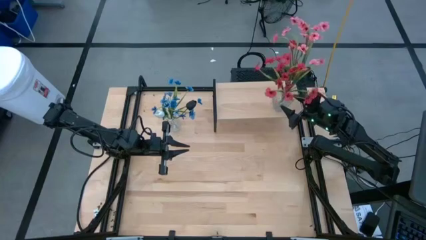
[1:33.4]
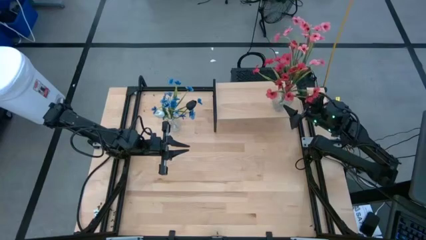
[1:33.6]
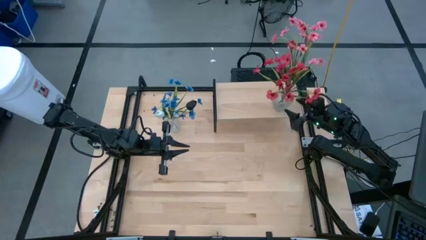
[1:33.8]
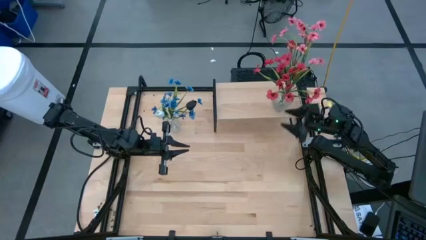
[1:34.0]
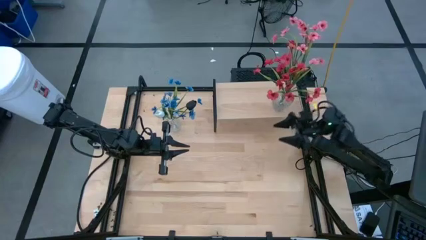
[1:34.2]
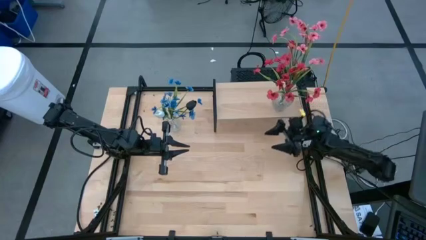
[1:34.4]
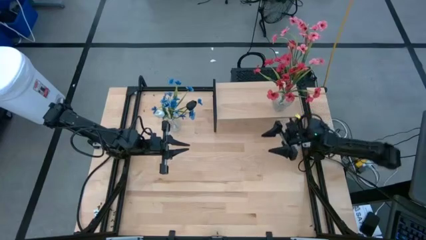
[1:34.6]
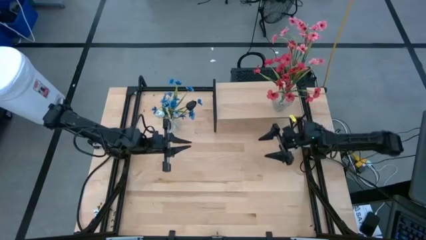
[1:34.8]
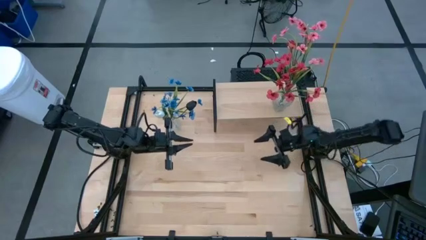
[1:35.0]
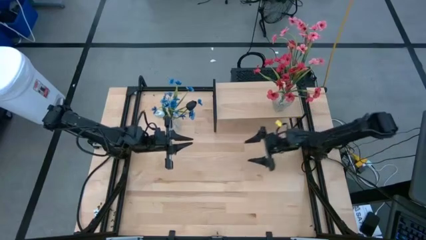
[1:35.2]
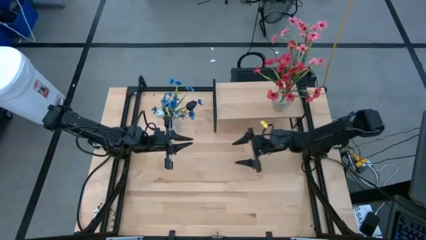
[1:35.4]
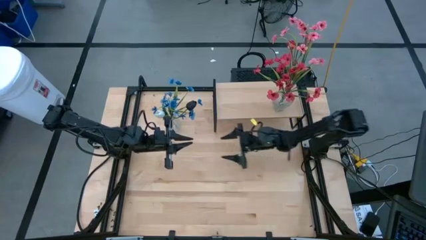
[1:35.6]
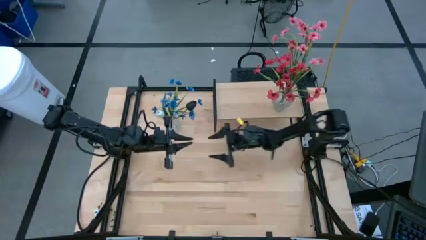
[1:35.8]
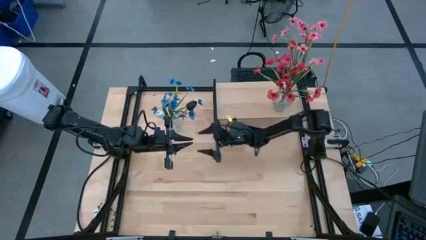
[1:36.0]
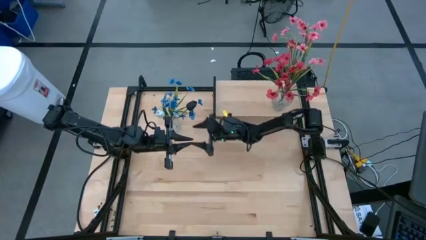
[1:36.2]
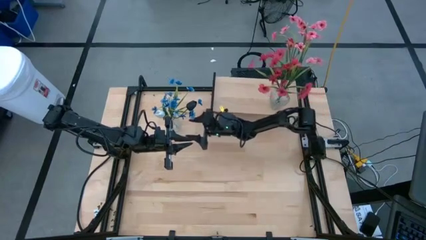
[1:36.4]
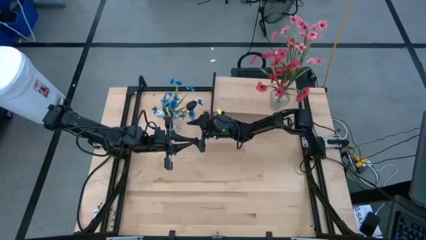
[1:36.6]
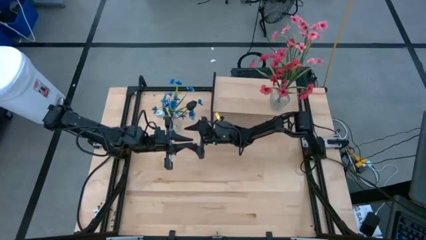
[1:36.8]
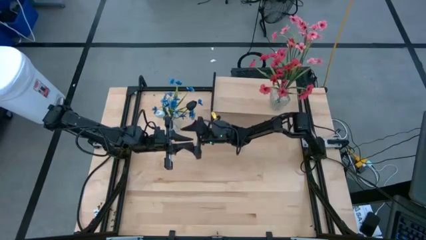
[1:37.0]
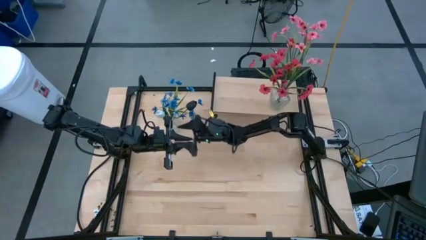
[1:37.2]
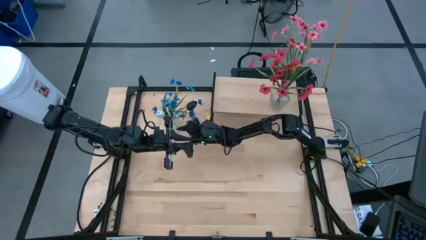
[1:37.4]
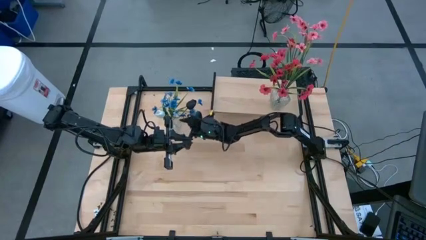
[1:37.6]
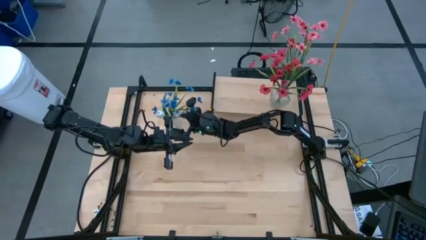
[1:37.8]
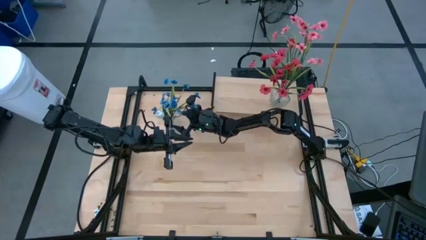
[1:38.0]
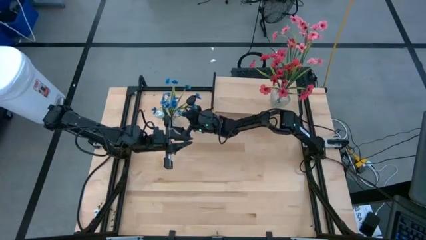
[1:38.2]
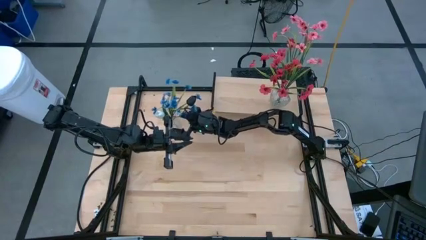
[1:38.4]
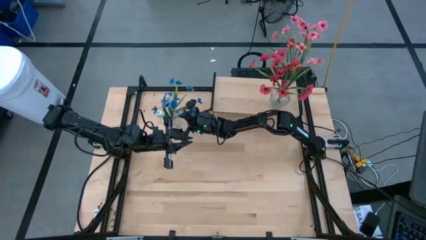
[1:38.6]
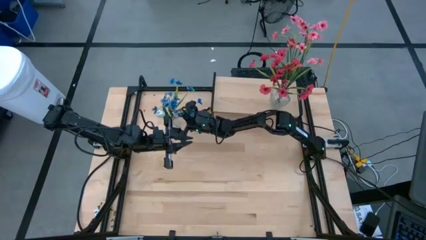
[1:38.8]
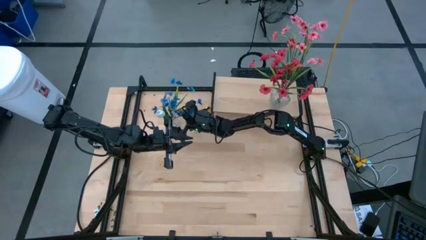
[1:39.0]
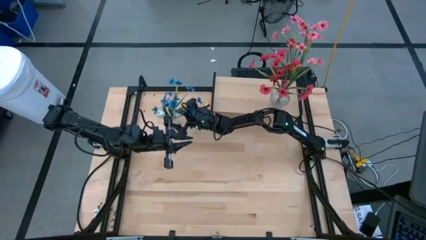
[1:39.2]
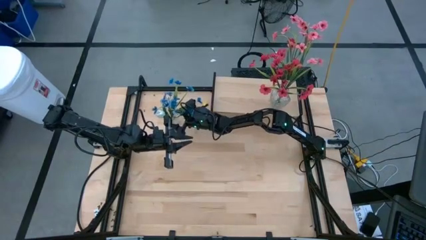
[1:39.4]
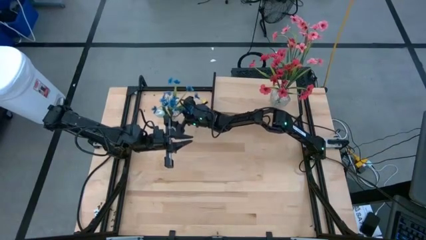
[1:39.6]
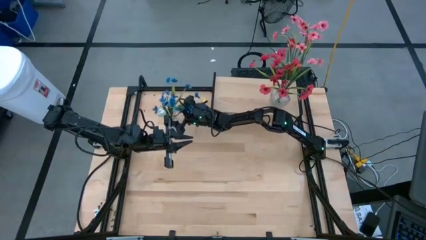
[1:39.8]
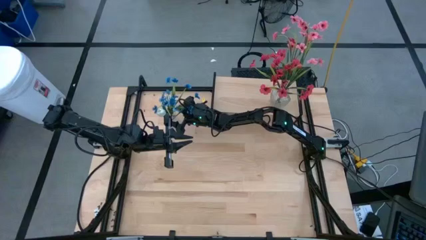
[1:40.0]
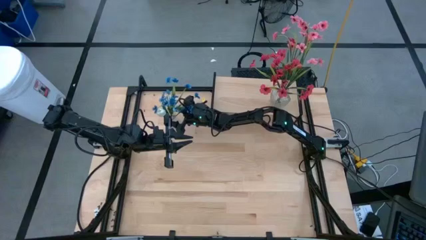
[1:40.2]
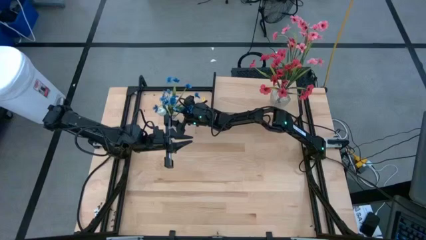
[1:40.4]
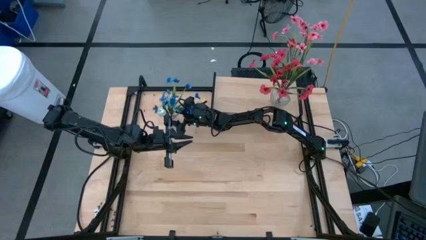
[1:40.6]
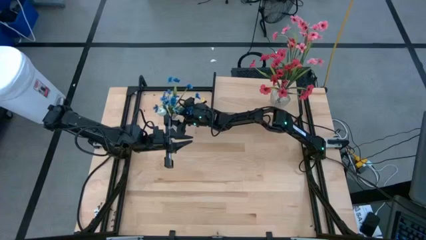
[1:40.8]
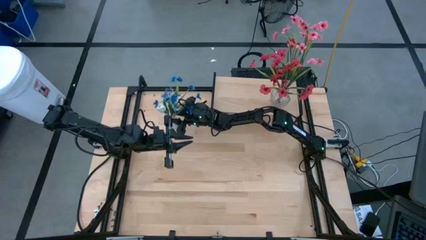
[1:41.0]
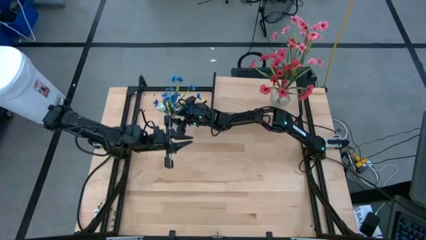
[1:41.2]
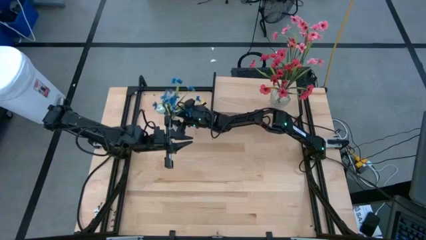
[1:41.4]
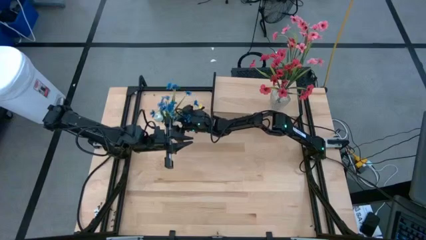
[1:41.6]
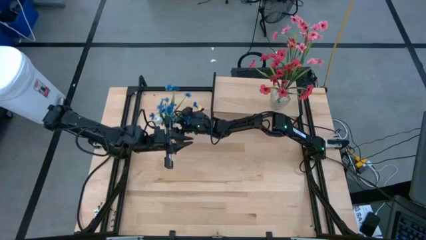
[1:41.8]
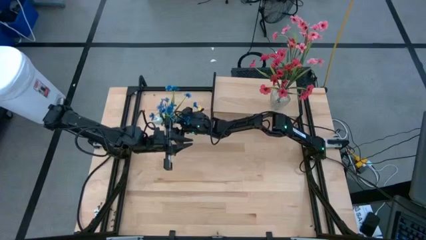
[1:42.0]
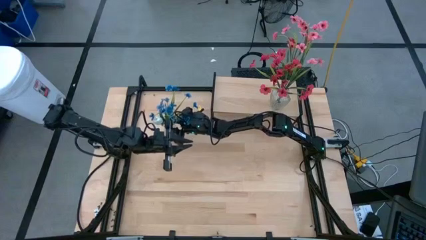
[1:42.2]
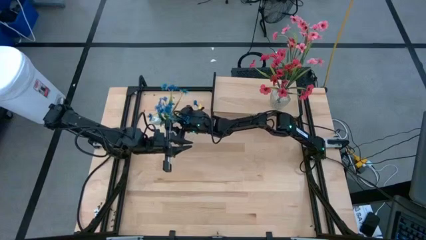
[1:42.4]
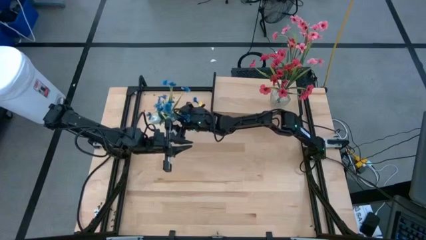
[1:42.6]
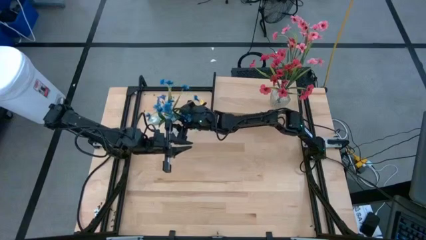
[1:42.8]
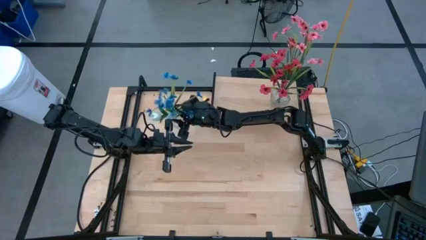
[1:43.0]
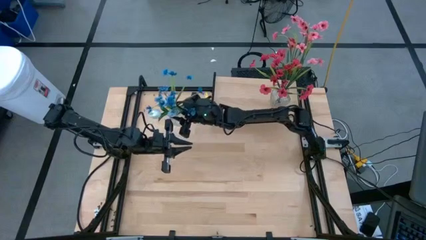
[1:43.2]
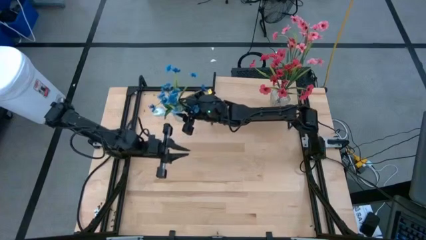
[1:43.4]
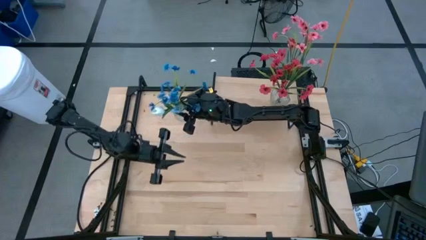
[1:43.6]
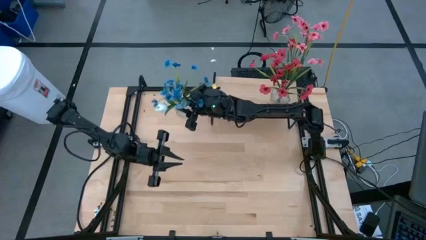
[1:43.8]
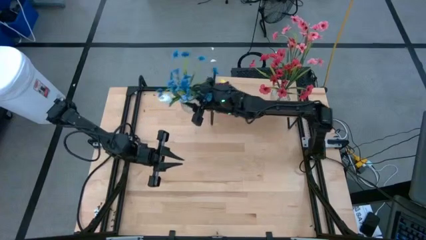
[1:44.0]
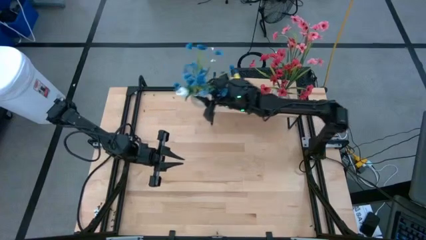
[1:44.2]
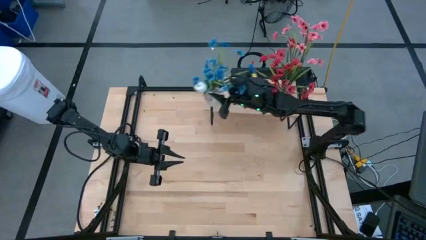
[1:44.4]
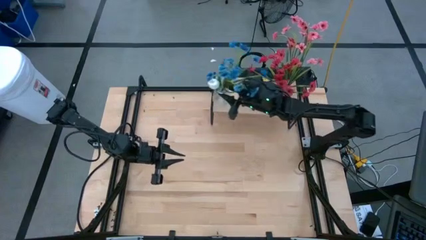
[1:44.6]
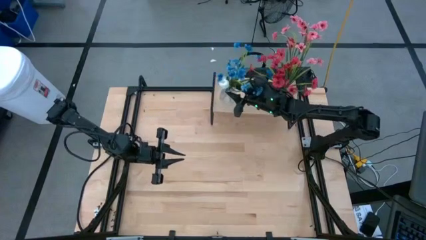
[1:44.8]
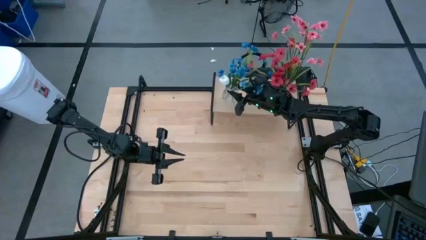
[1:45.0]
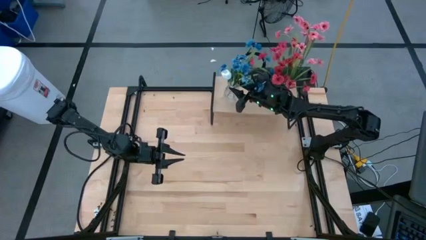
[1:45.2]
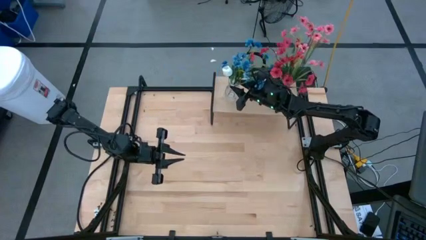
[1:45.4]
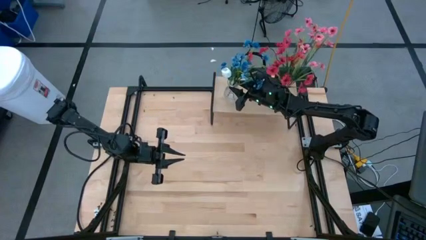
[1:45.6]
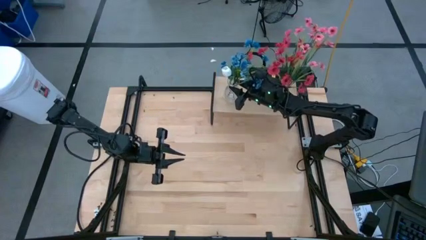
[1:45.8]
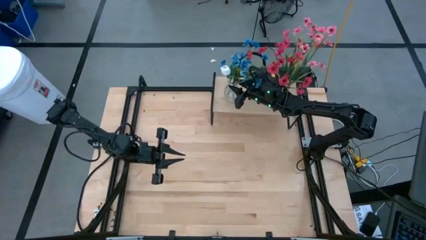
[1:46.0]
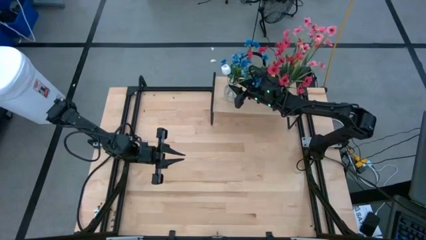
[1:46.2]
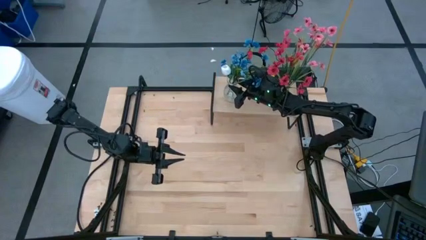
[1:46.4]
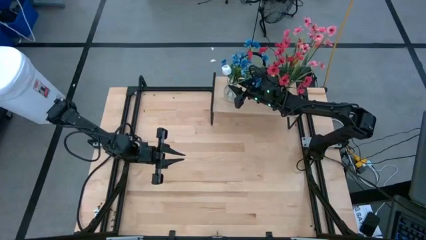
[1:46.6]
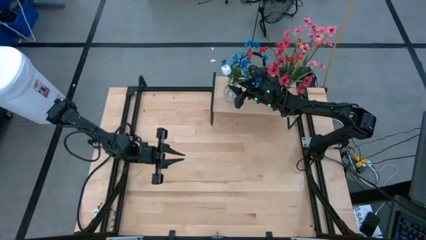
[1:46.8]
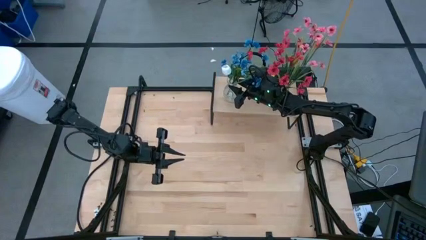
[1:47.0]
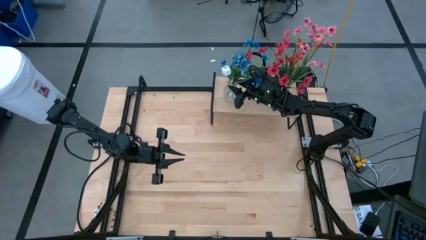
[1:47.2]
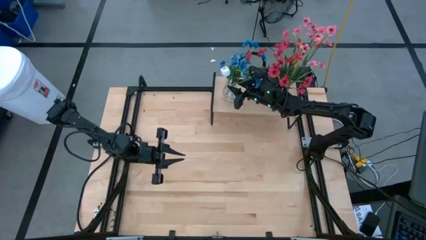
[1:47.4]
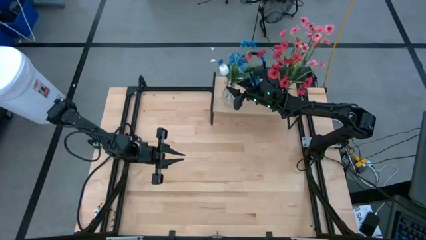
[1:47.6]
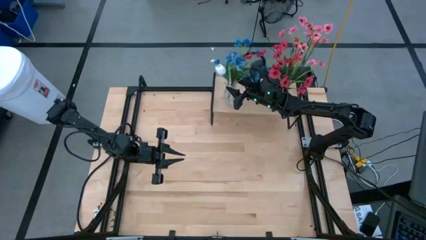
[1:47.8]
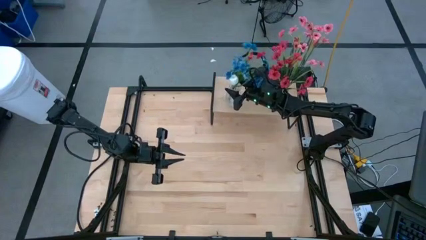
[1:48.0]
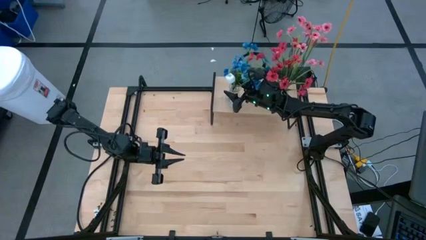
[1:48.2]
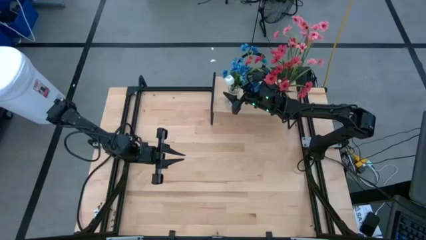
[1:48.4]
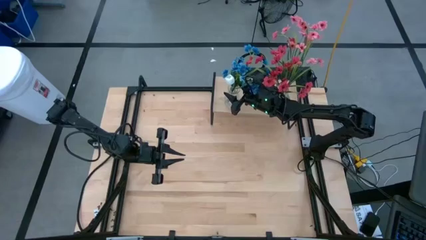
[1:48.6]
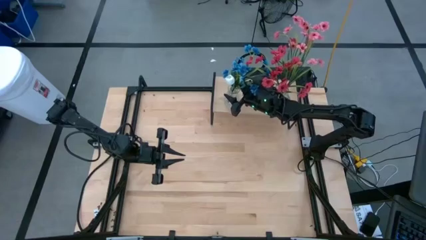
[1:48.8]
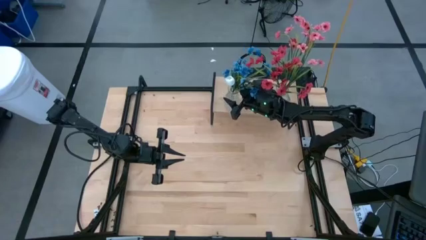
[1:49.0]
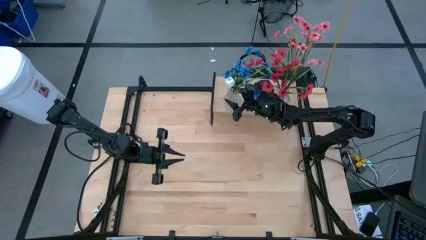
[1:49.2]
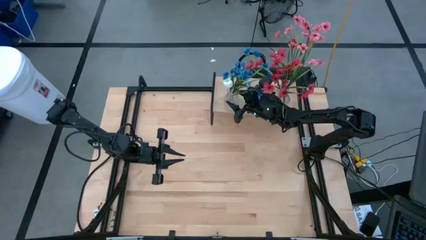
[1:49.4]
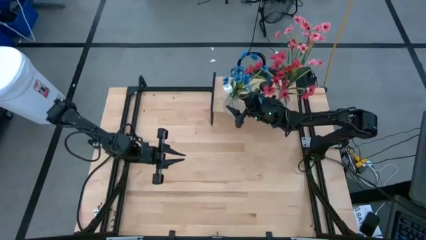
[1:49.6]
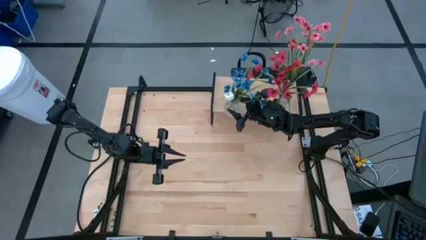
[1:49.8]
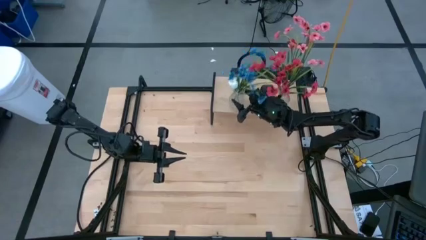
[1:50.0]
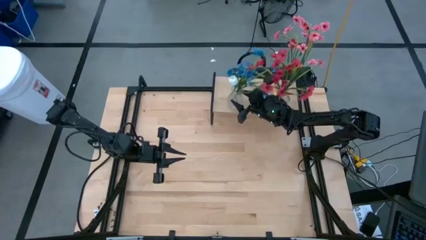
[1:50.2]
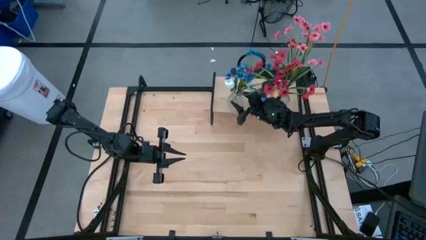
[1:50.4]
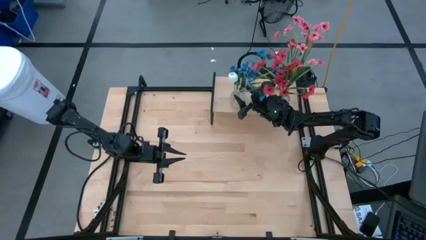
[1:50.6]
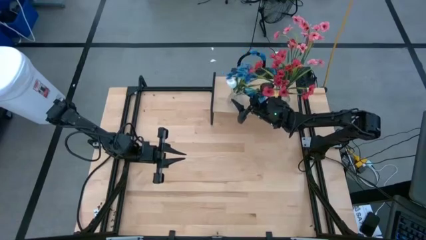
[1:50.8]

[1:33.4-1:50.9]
Task: Pick and place flowers into a vace then onto a shelf
Put the transparent vase with flowers on the shelf
